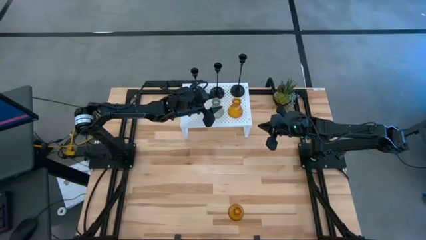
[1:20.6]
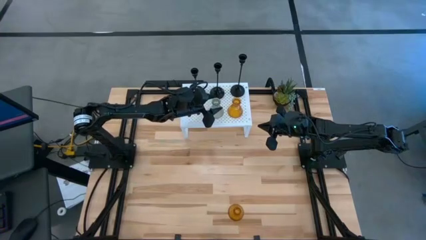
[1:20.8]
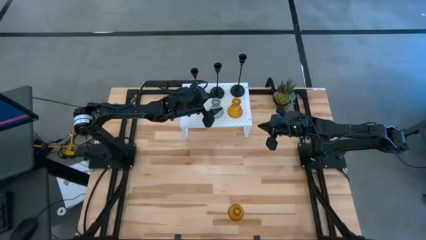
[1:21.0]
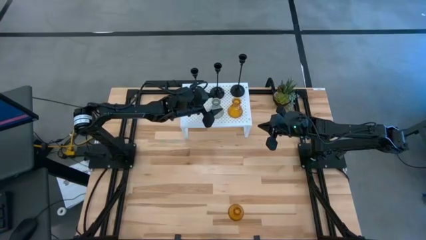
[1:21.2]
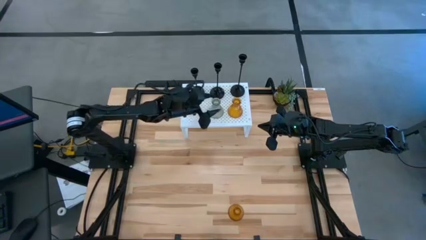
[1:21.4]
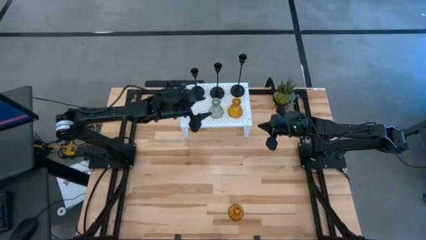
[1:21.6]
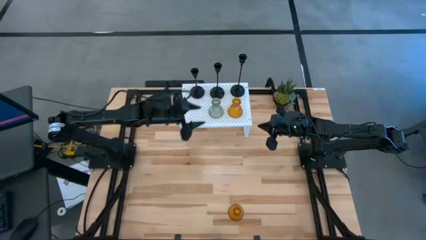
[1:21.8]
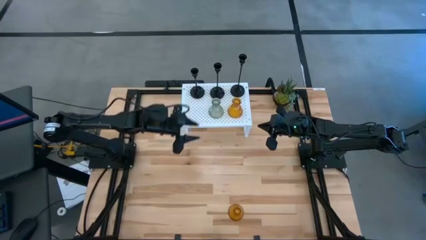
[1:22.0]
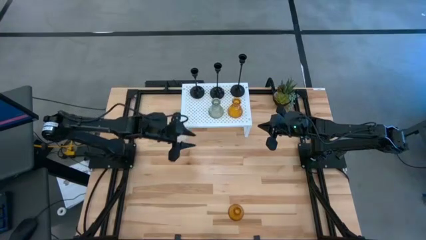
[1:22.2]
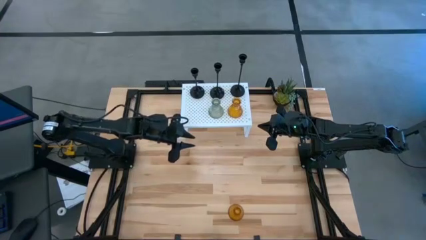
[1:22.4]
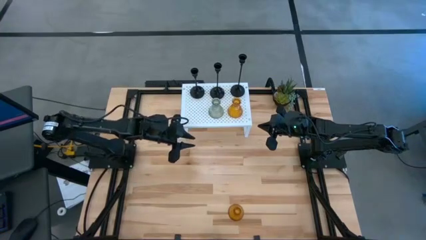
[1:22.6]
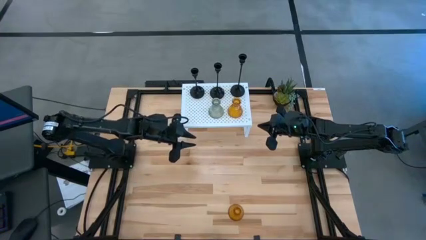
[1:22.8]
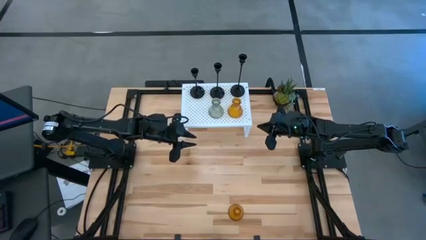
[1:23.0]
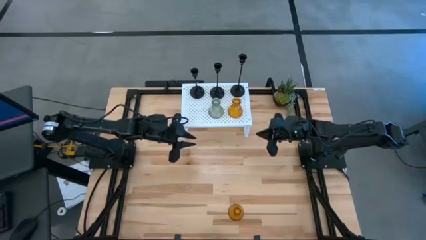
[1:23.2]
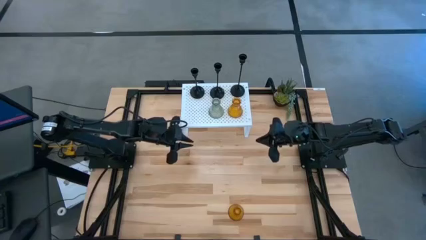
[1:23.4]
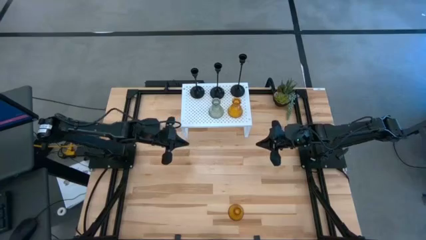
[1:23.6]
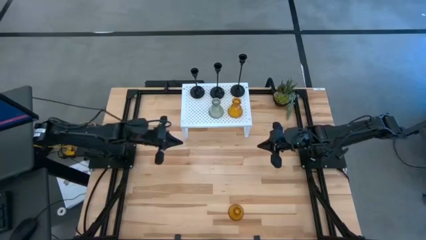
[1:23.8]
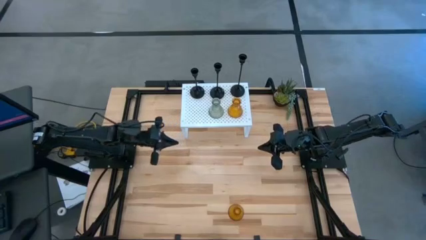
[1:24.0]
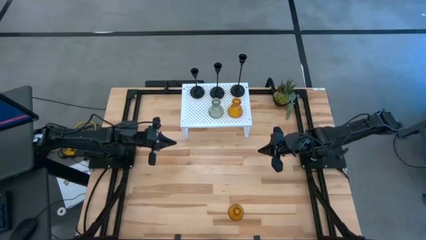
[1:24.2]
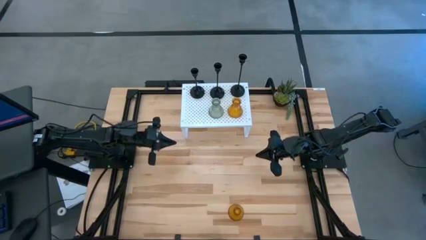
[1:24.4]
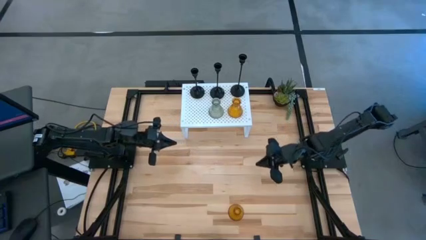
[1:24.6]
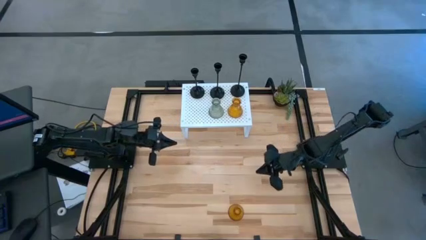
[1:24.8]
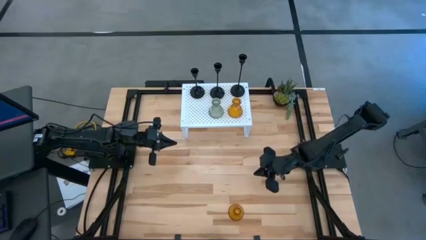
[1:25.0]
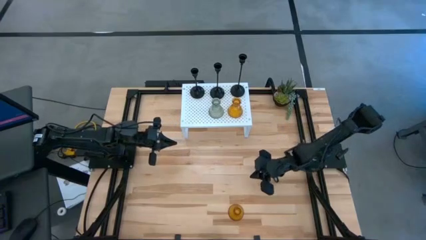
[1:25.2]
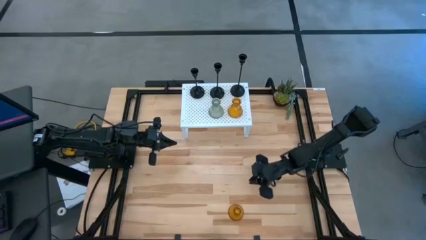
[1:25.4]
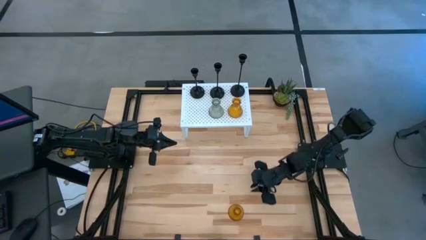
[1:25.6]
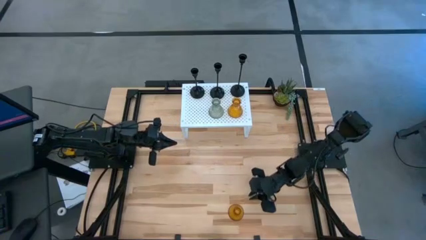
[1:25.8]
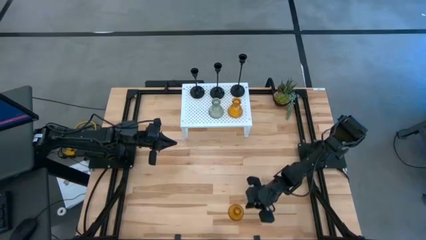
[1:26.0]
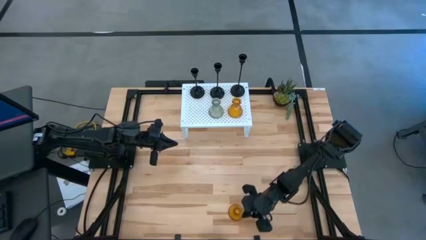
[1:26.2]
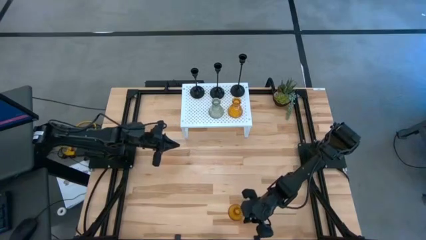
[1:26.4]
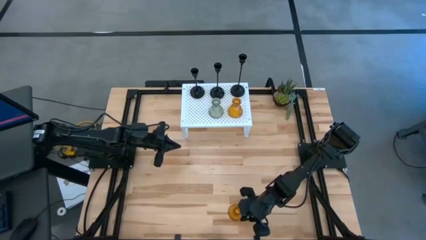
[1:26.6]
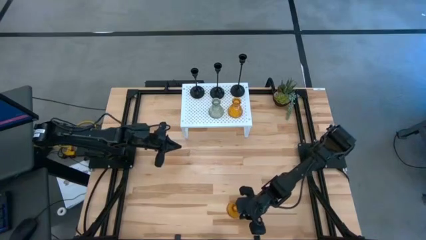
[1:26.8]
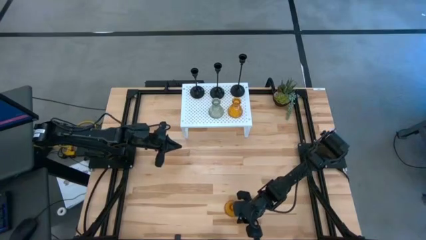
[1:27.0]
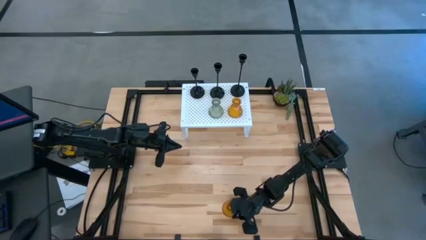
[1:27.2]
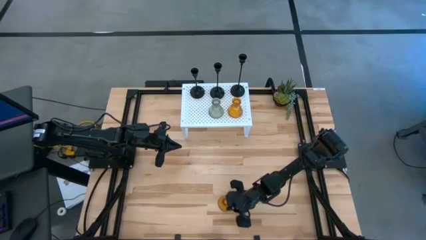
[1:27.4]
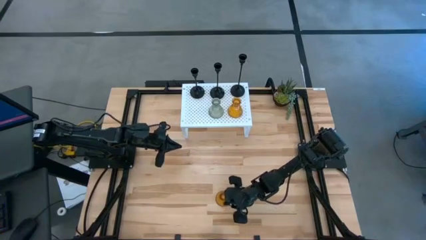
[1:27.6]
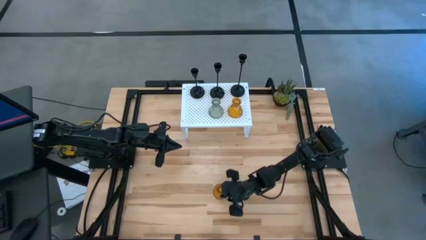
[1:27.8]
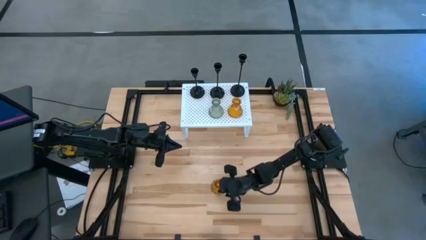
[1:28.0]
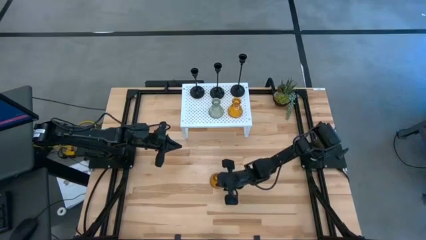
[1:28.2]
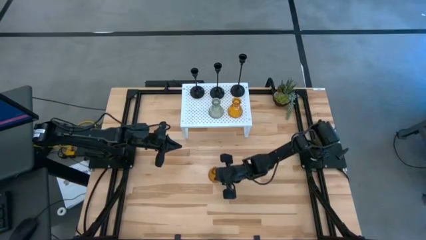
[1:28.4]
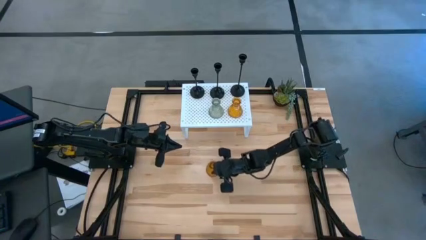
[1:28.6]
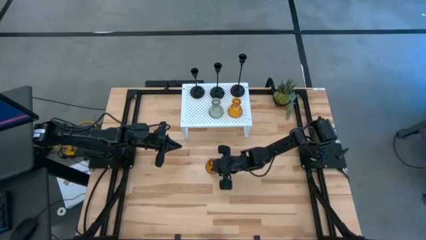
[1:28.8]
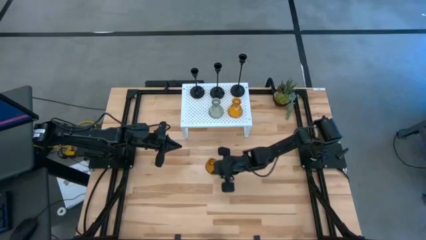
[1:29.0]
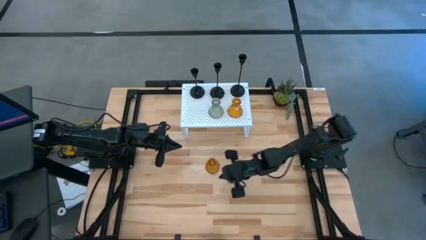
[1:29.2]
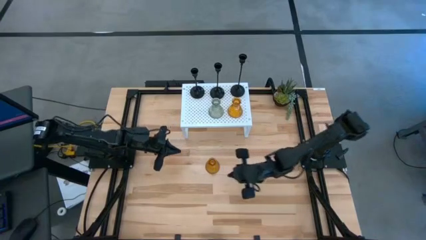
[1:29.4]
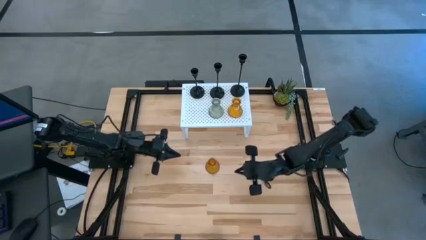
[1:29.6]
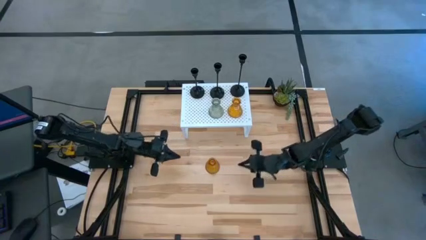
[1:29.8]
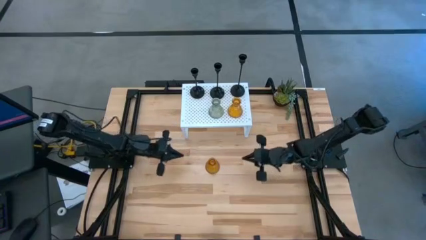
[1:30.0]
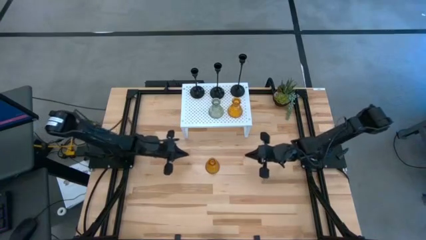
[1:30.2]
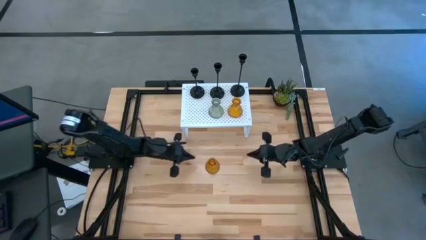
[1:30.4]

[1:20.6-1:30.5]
Task: Pick & Place candle stick holders
Put the orange candle holder on the white shelf

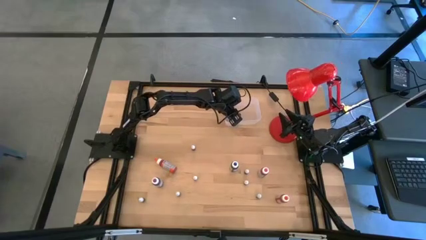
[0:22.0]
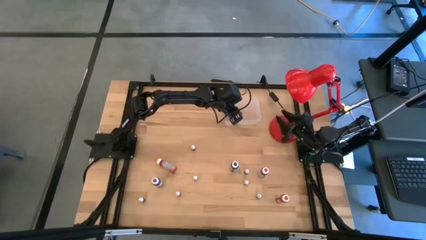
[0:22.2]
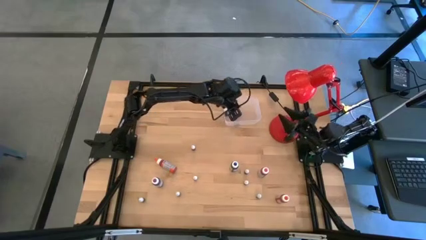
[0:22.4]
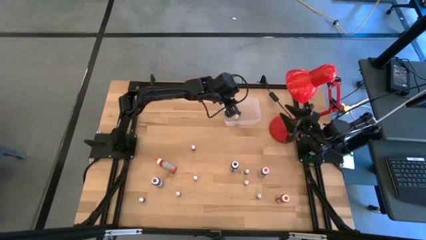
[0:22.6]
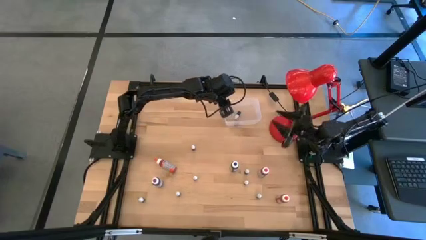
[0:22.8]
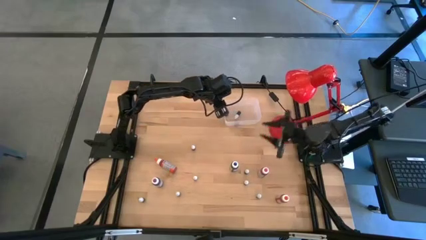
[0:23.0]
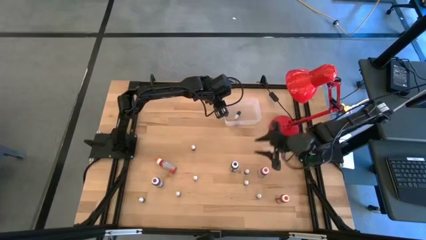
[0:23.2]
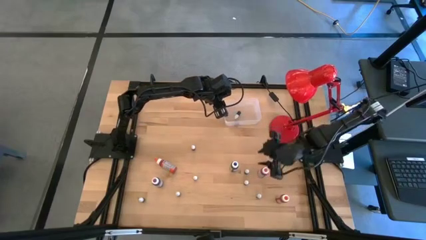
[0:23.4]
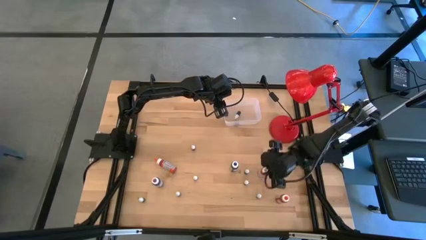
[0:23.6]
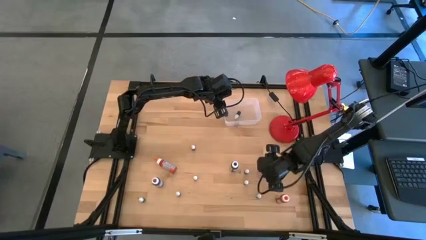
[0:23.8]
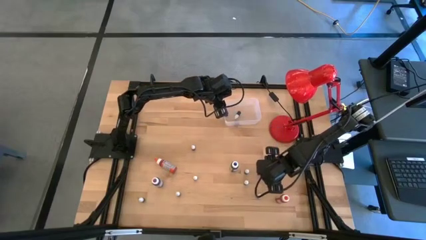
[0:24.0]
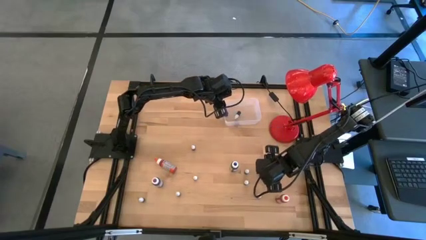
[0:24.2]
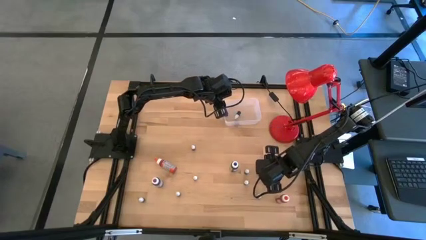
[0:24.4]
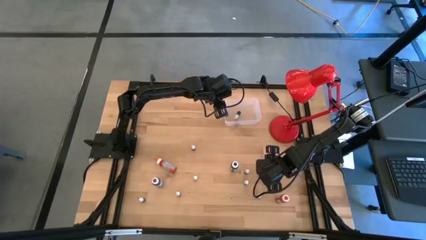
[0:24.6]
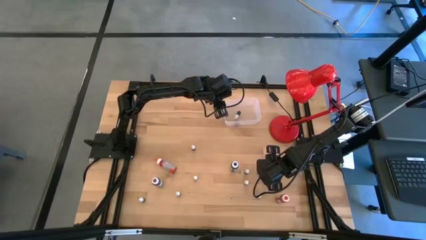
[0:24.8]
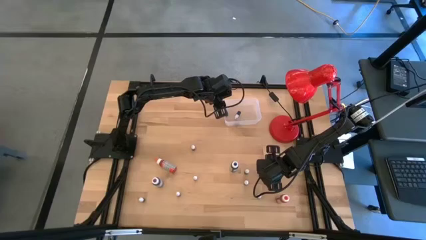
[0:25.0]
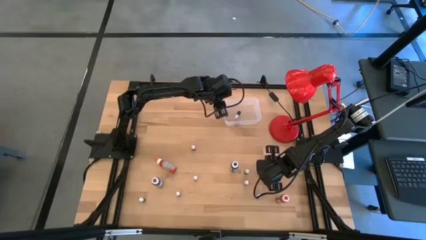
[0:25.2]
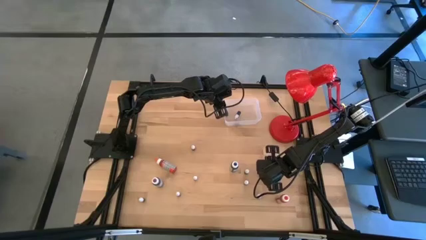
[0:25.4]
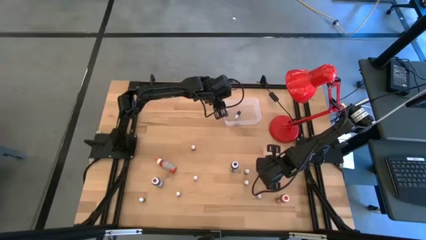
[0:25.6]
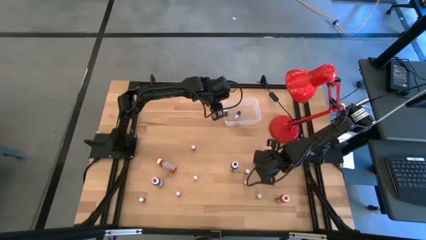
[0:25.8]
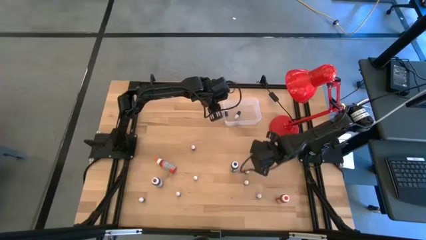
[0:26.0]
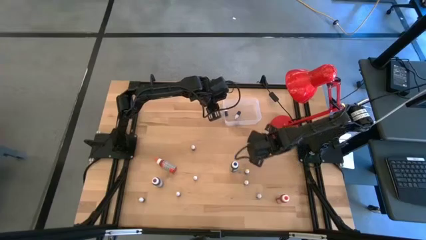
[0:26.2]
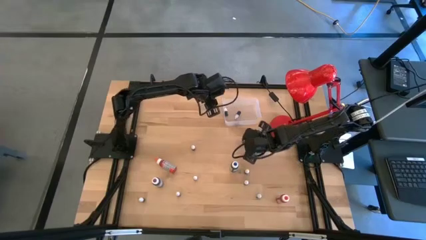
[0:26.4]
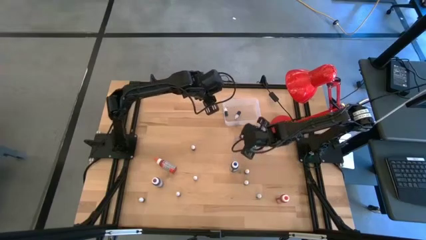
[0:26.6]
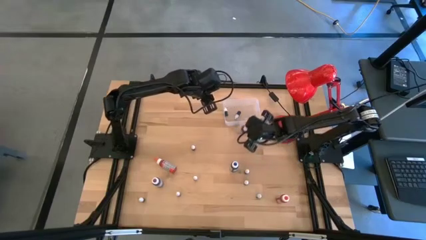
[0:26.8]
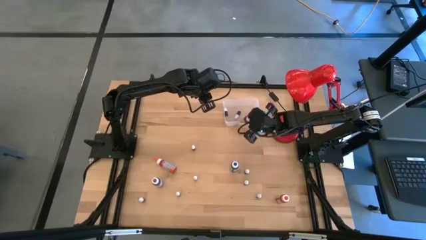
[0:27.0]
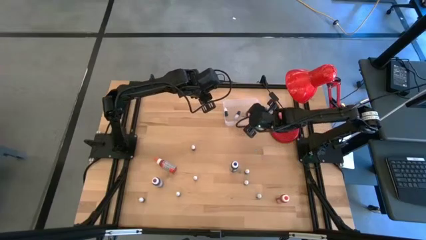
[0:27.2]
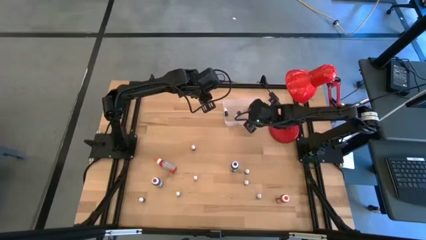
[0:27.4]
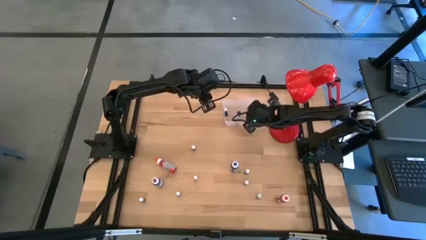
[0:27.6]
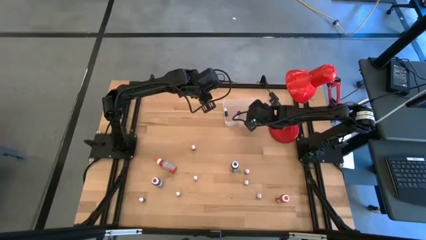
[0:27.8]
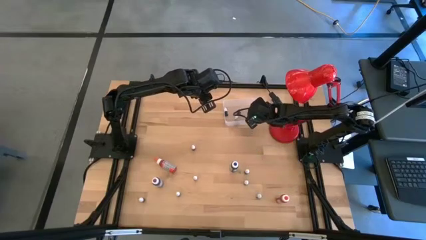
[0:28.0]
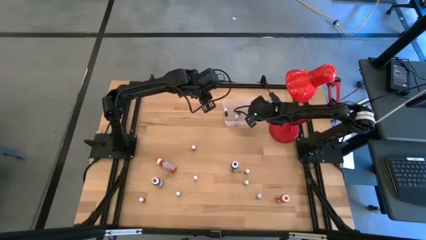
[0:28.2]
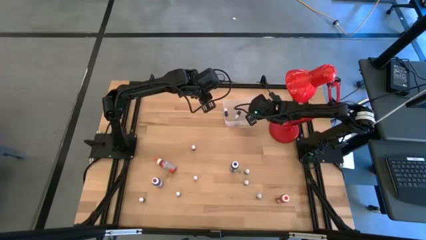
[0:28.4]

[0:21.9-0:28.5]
Task: Pick & Place food coloring
Put the big red food coloring bottle in the transparent bin
